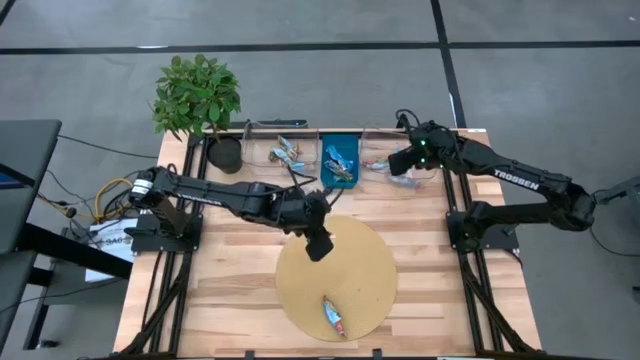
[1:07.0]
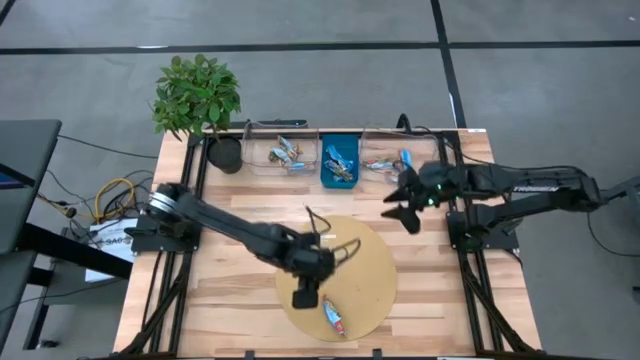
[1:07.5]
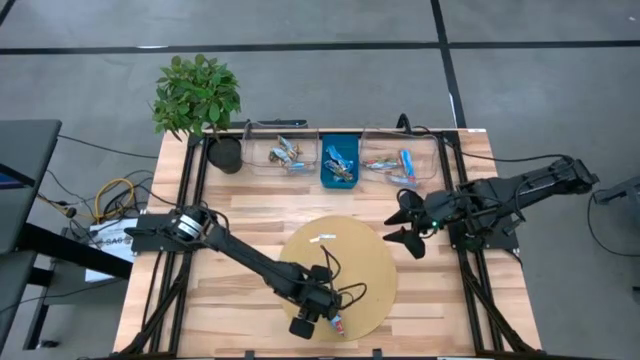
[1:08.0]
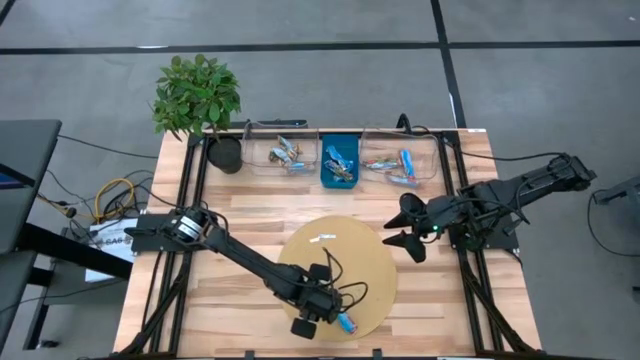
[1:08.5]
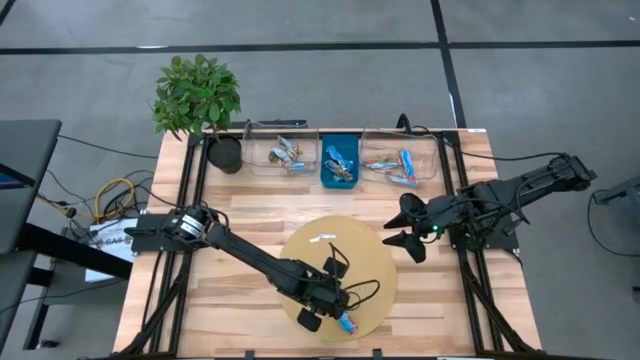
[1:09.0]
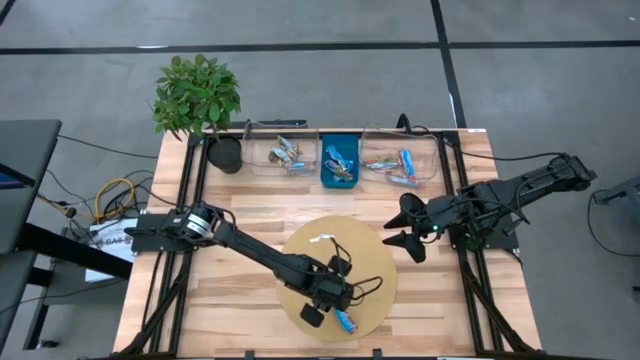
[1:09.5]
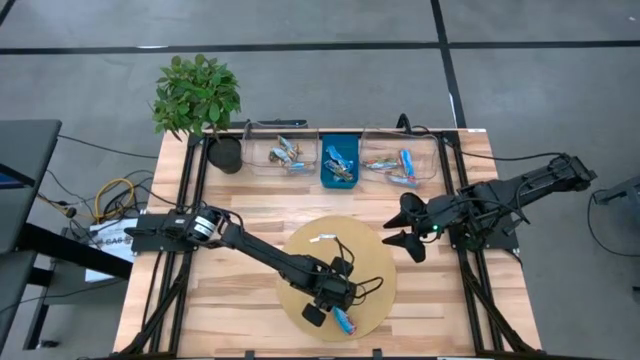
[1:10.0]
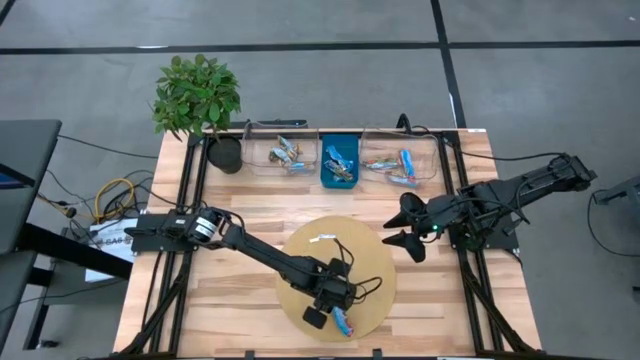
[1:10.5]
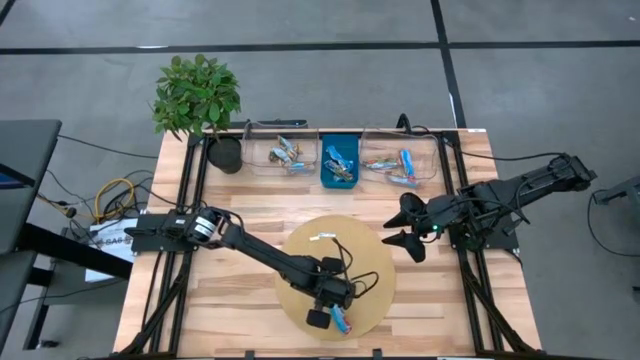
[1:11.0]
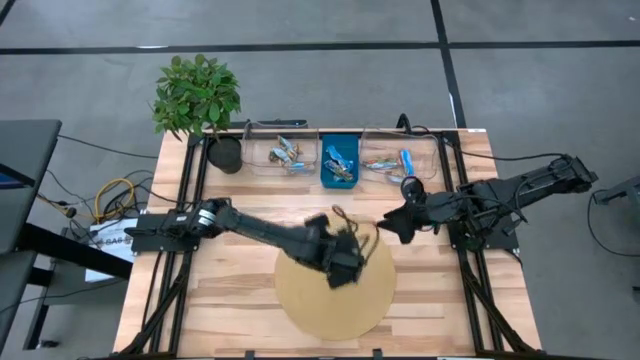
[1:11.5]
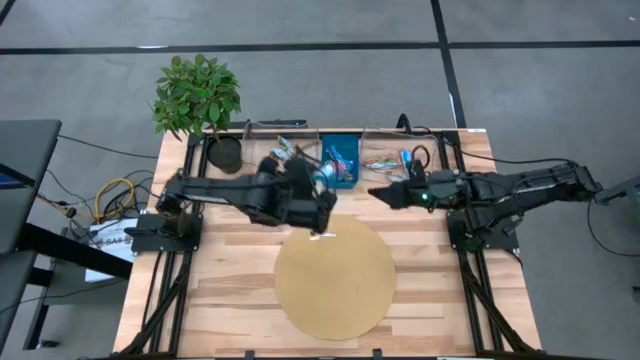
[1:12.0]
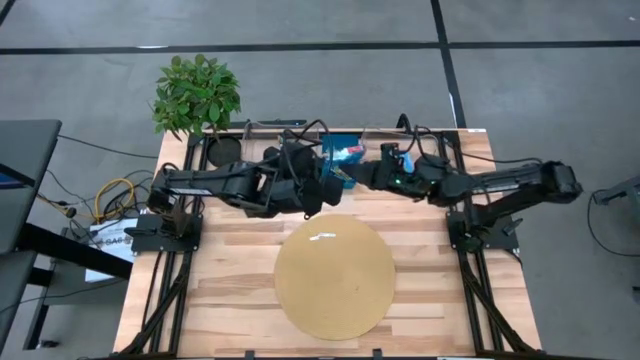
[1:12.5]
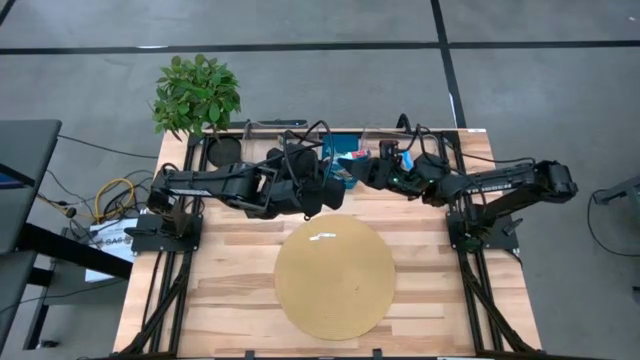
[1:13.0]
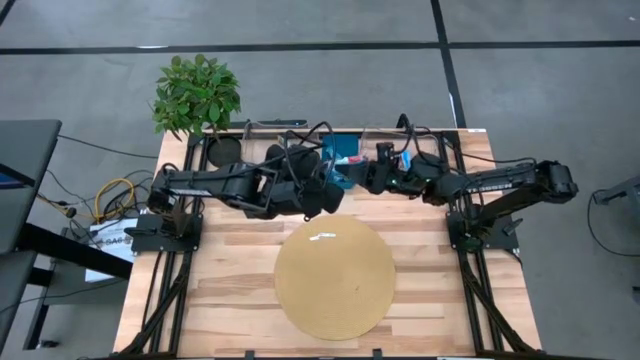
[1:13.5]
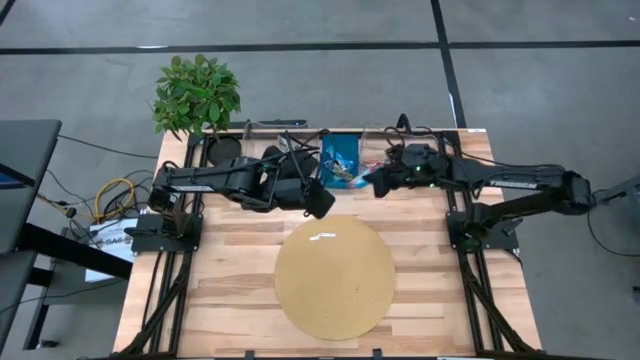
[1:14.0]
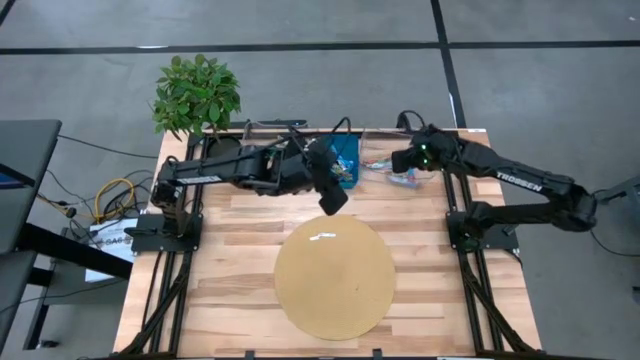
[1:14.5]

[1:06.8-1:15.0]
Task: Pick and place Granola Bars by type
Put the red granola bar into the right transparent bin

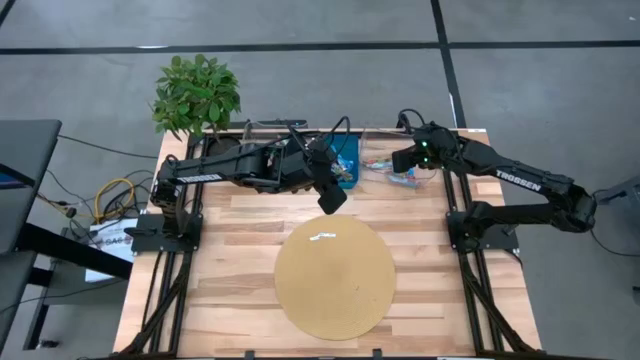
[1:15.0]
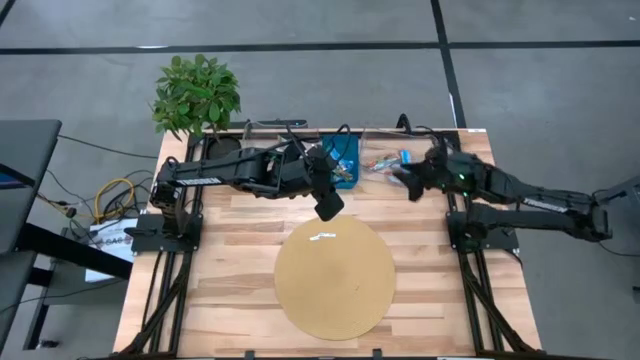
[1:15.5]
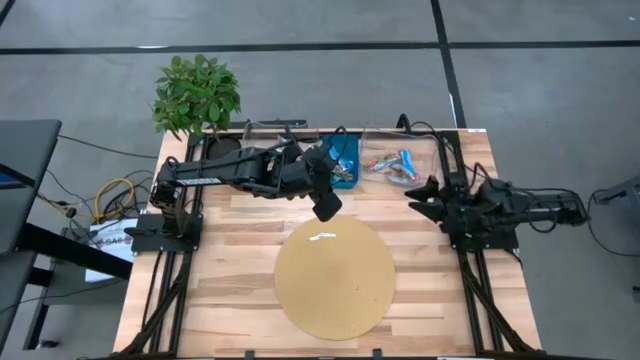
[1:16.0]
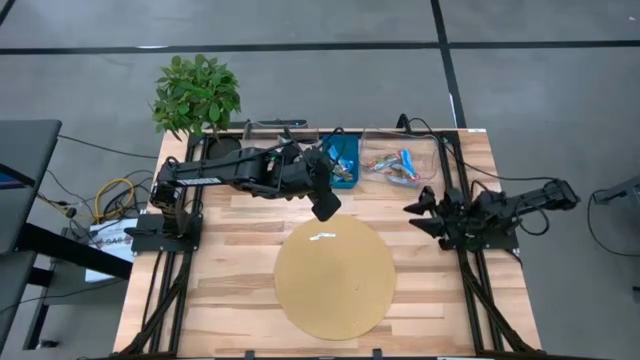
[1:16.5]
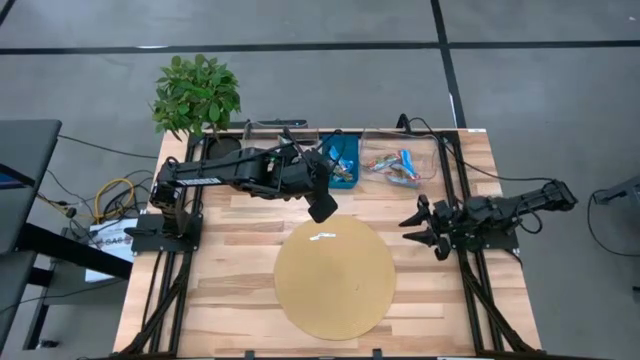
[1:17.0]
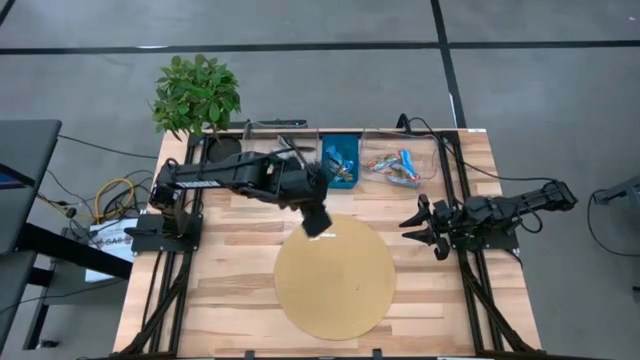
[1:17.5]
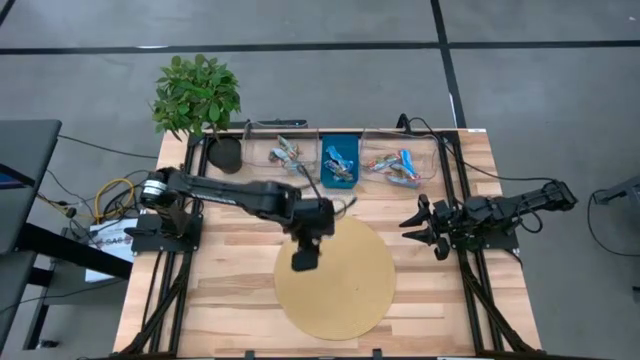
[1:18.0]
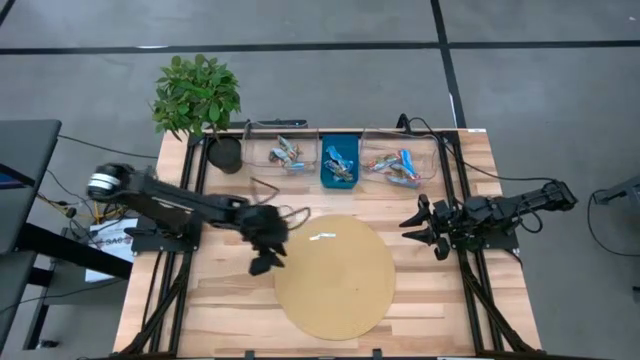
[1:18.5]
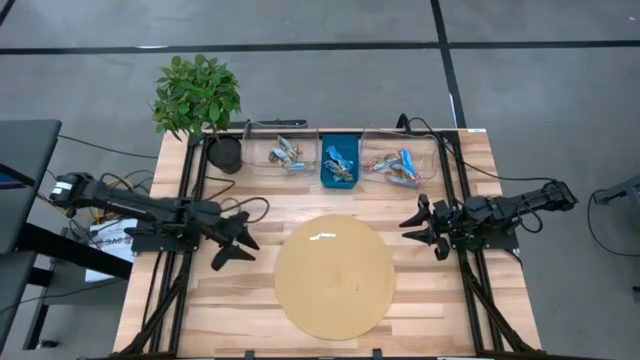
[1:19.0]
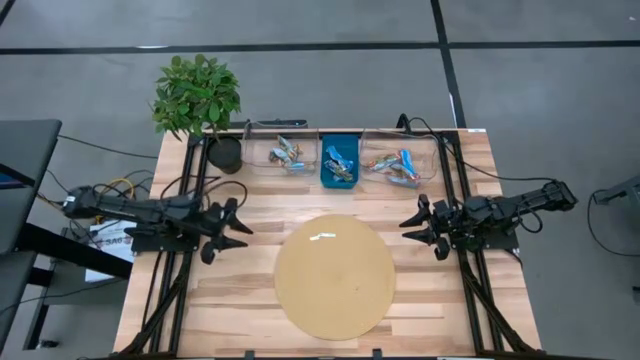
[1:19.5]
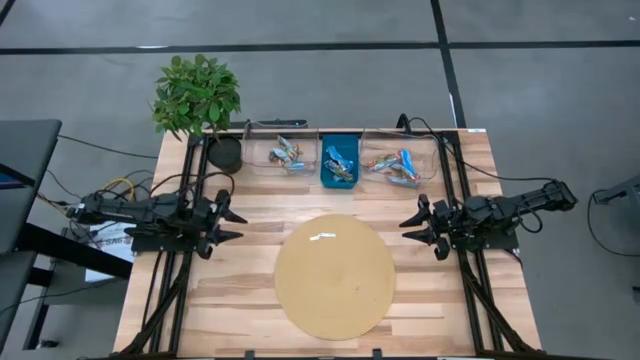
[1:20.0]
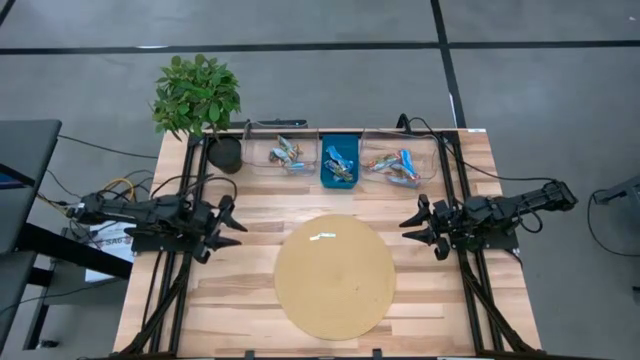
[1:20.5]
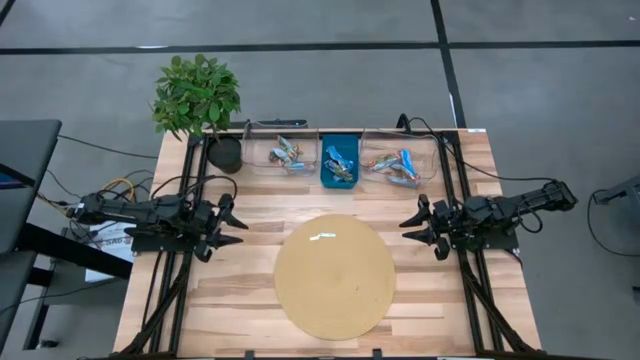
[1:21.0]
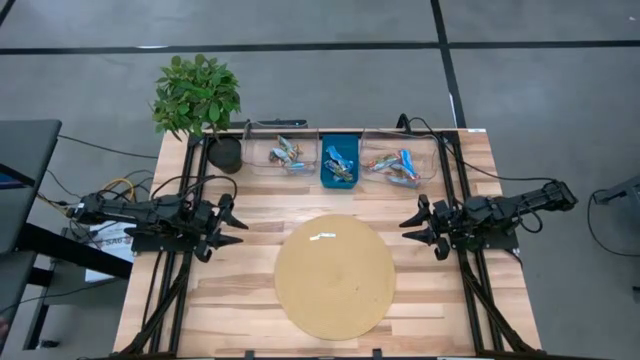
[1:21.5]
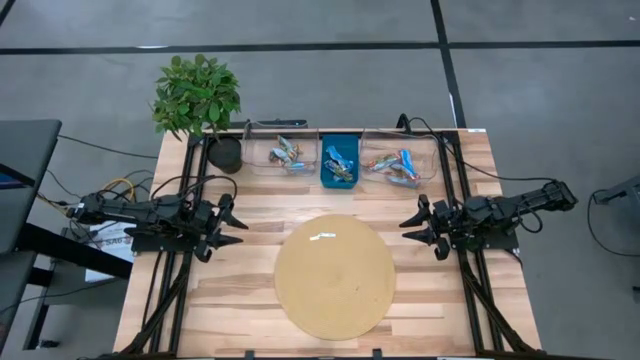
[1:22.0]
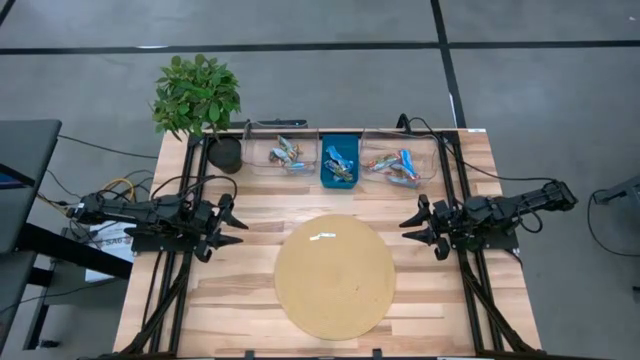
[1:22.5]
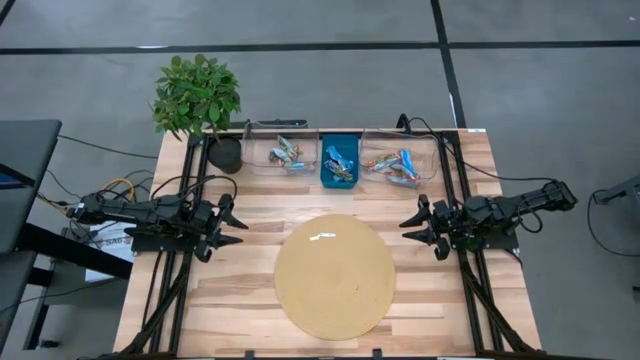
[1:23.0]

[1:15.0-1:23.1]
Return to Home Position

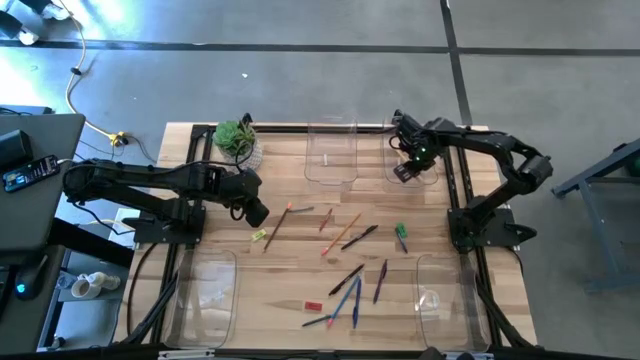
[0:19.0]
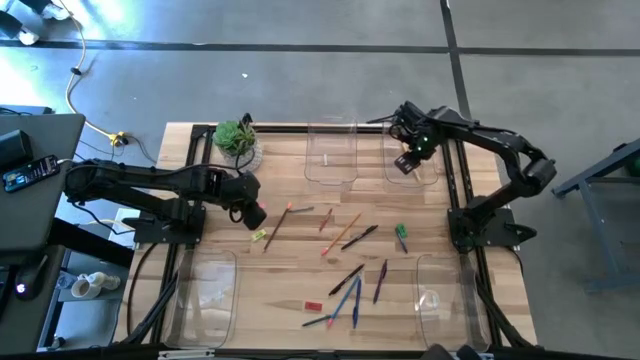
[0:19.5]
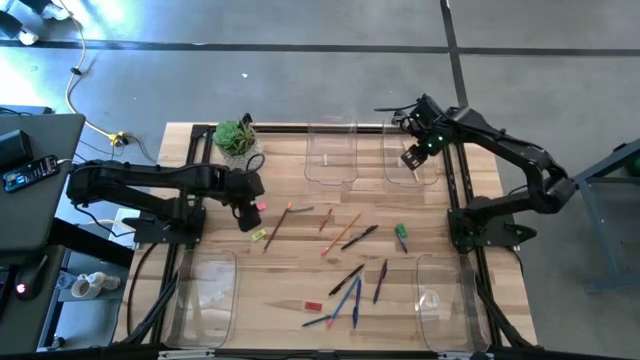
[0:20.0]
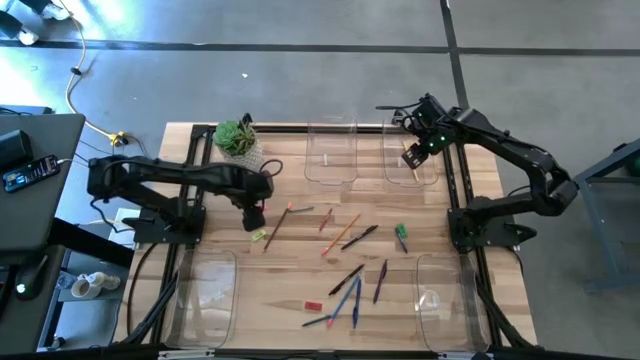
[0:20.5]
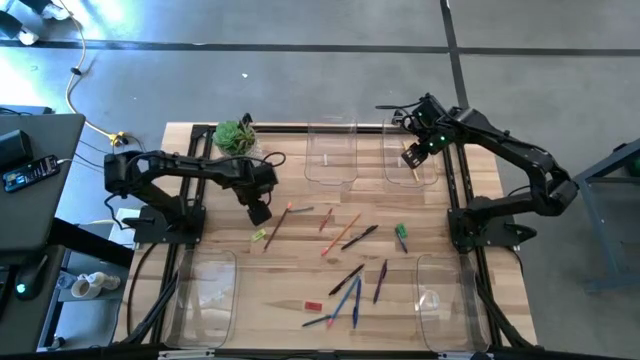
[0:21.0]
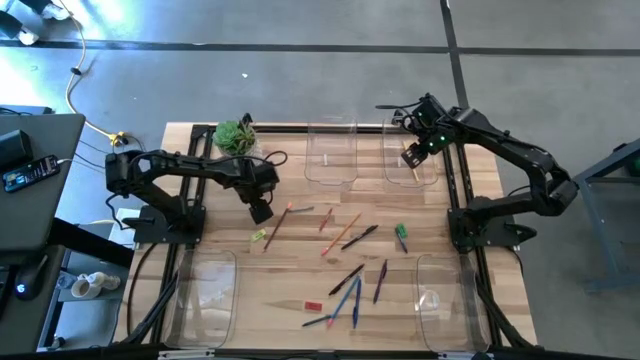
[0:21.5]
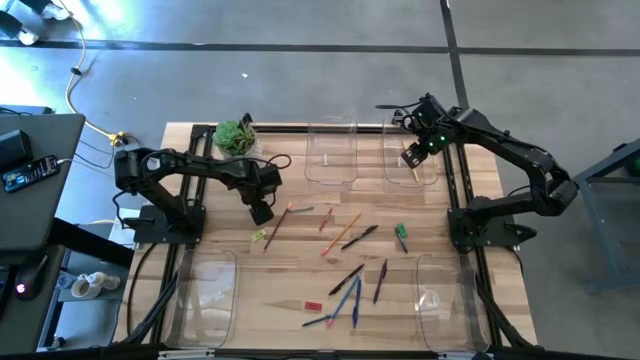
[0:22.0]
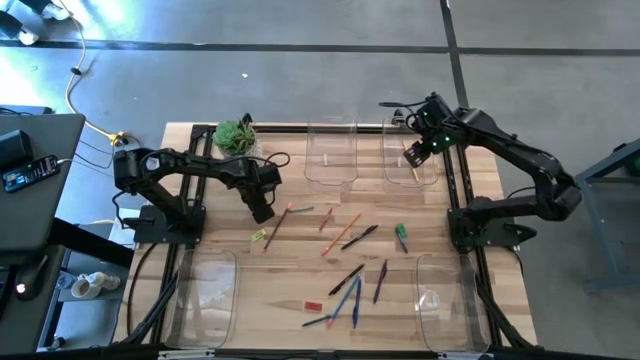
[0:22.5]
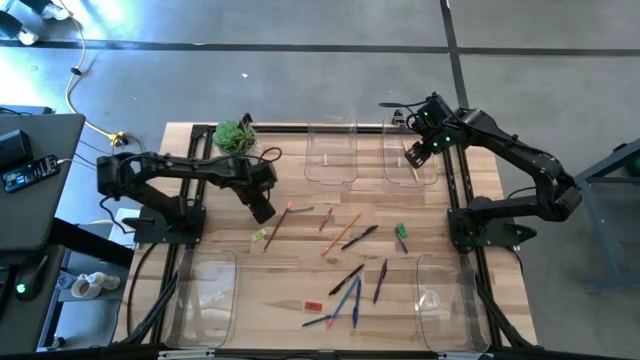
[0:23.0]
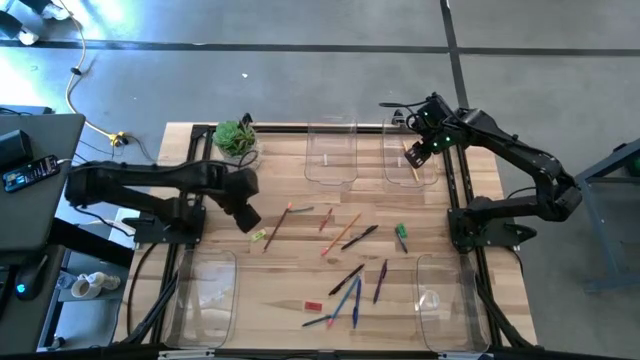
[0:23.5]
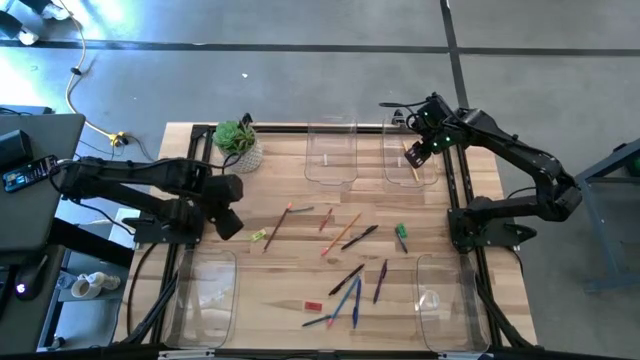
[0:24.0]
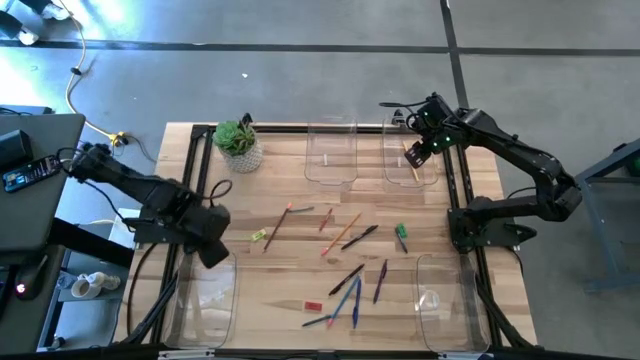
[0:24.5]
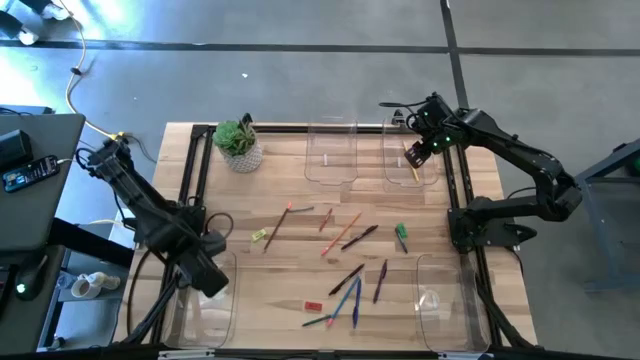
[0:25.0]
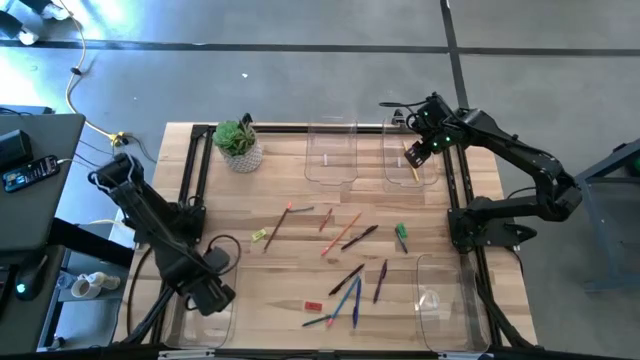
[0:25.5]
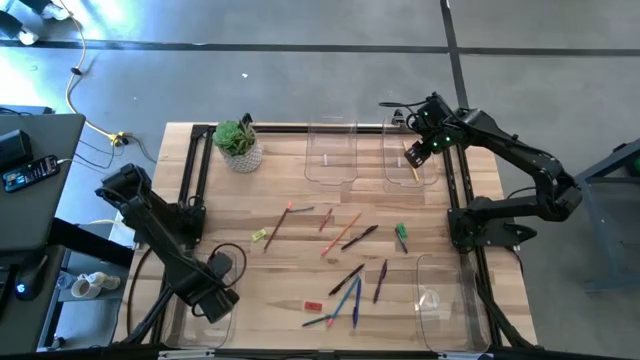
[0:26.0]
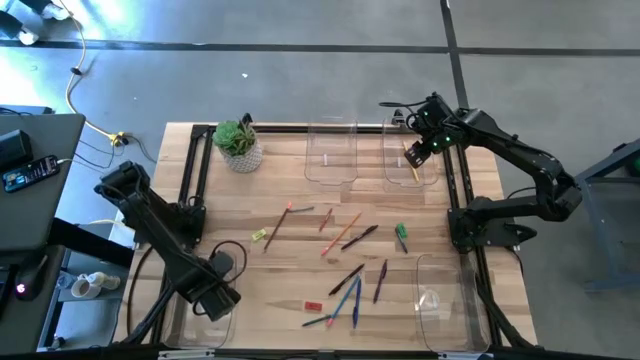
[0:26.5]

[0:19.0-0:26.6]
Task: Sort crayons/erasers/pens/pencils in bins
Put the pink eraser into the bottom left transparent bin
